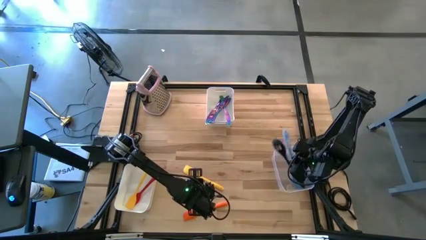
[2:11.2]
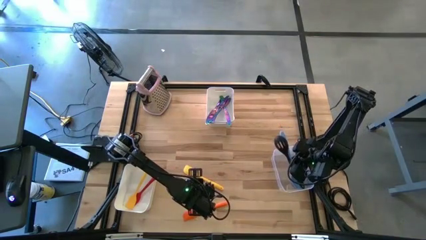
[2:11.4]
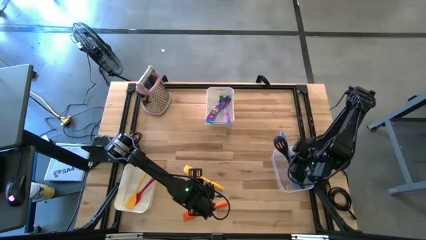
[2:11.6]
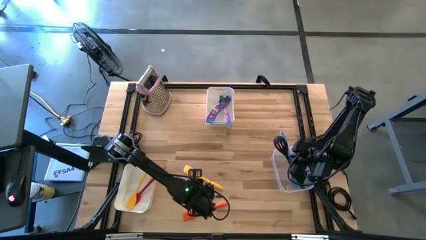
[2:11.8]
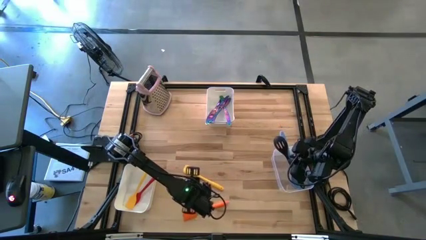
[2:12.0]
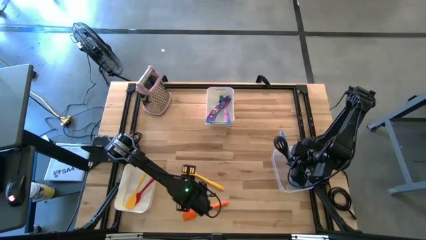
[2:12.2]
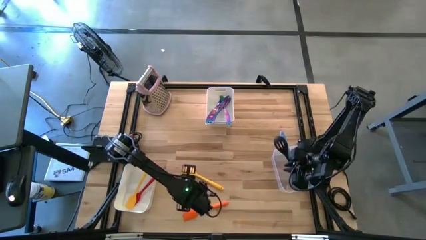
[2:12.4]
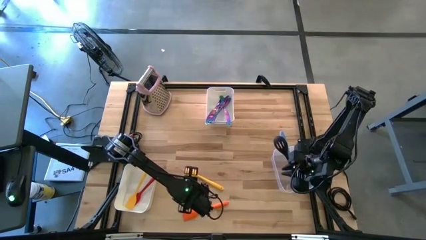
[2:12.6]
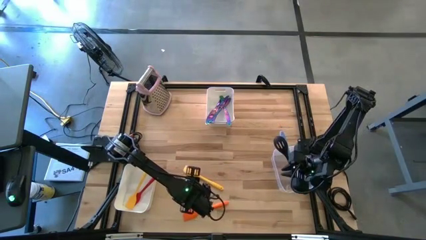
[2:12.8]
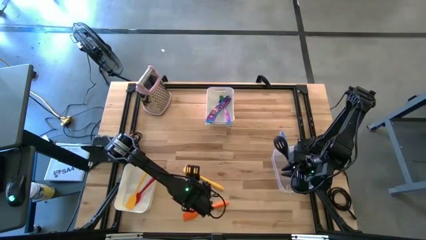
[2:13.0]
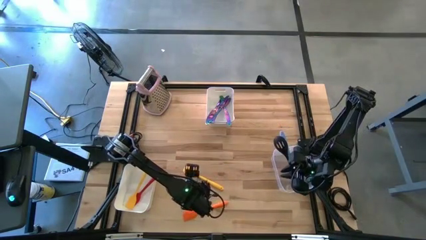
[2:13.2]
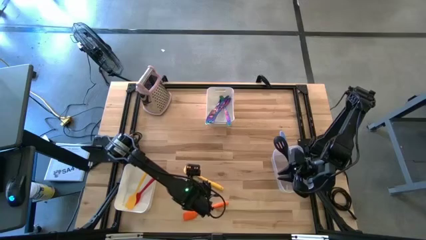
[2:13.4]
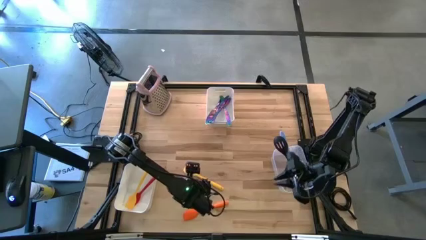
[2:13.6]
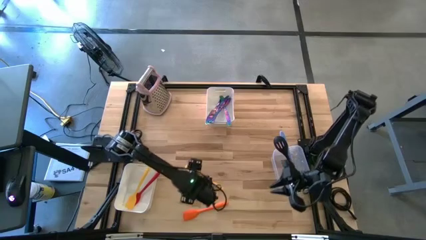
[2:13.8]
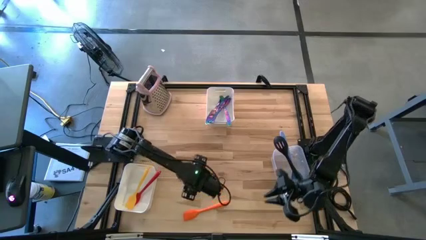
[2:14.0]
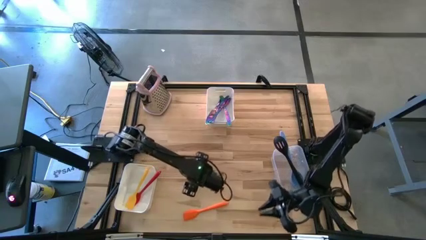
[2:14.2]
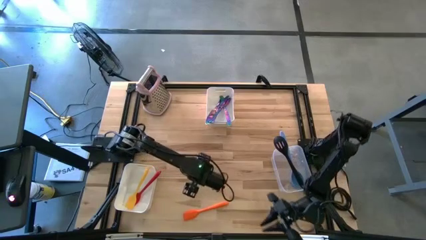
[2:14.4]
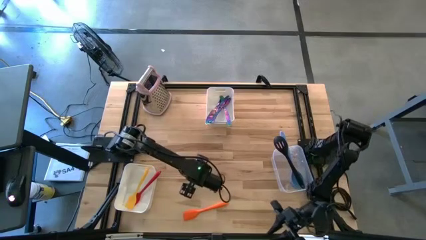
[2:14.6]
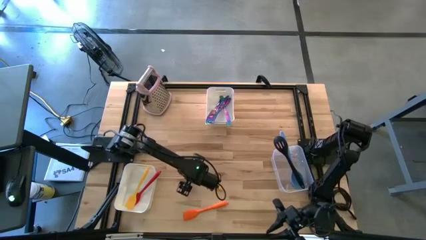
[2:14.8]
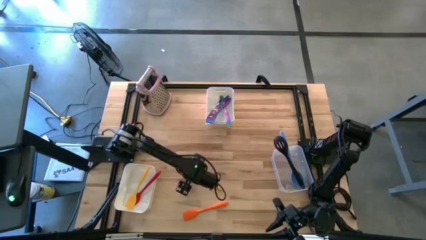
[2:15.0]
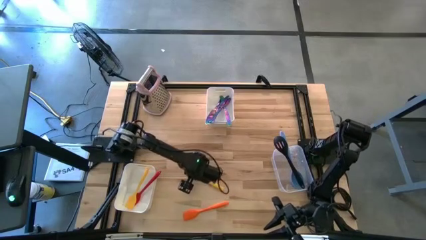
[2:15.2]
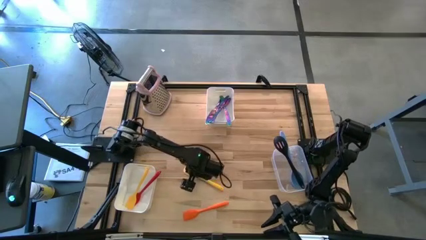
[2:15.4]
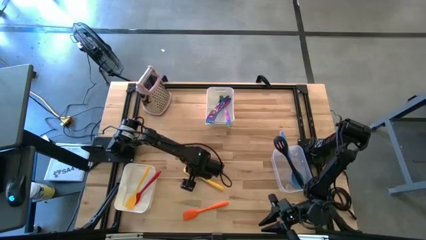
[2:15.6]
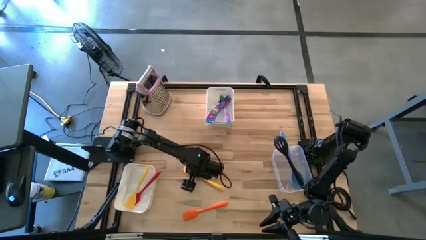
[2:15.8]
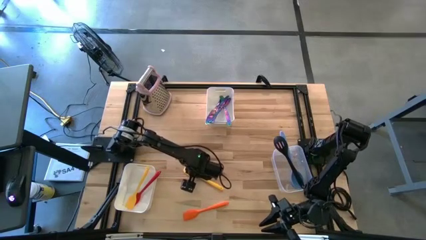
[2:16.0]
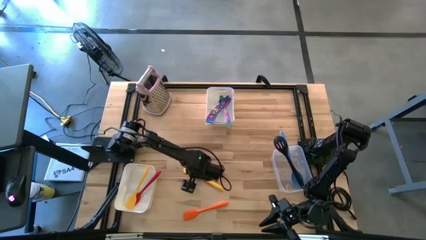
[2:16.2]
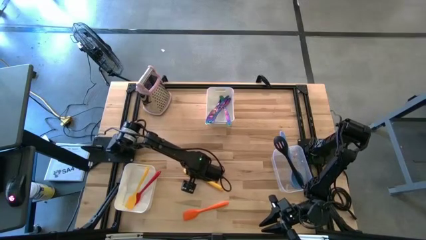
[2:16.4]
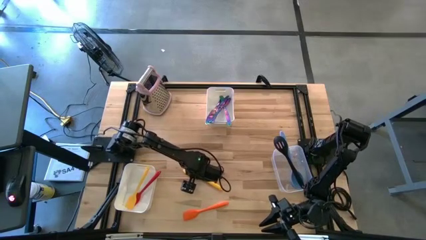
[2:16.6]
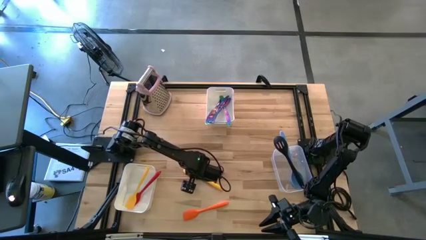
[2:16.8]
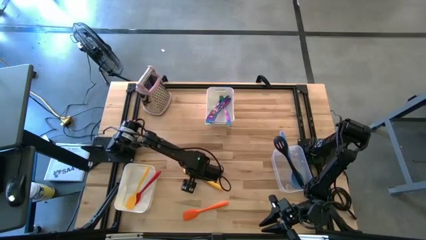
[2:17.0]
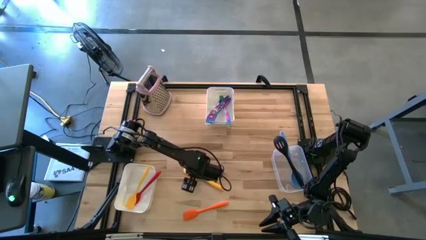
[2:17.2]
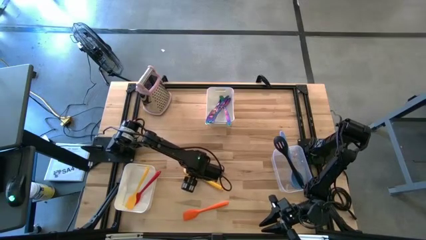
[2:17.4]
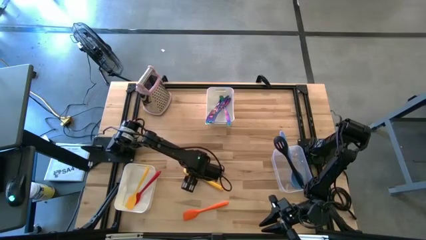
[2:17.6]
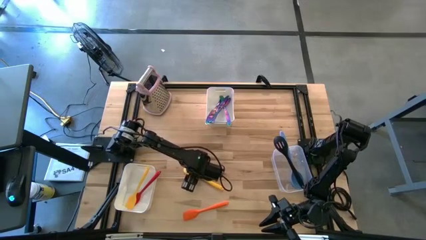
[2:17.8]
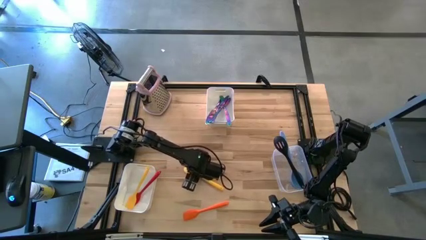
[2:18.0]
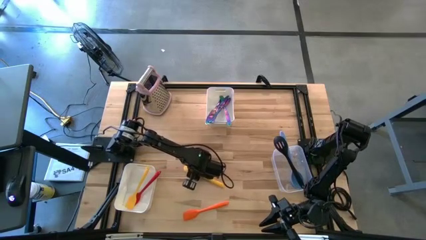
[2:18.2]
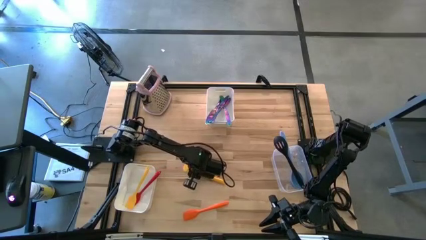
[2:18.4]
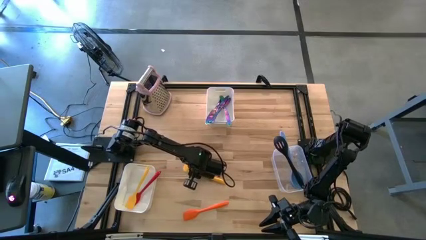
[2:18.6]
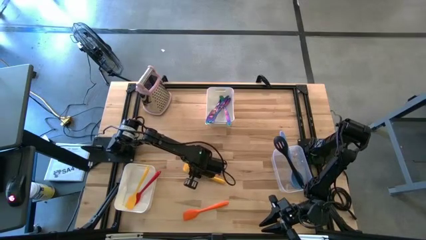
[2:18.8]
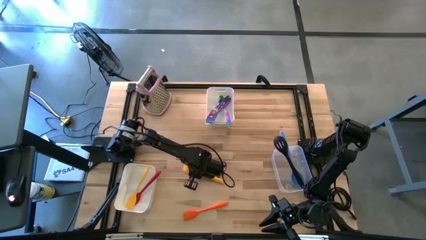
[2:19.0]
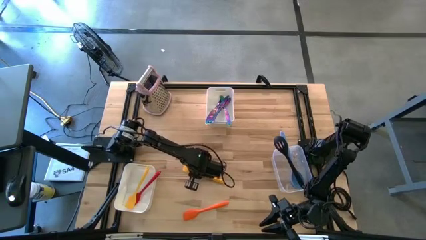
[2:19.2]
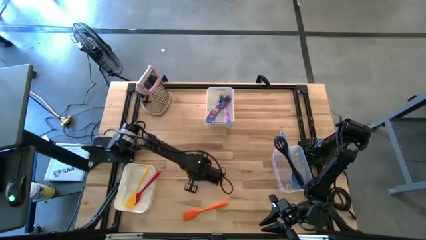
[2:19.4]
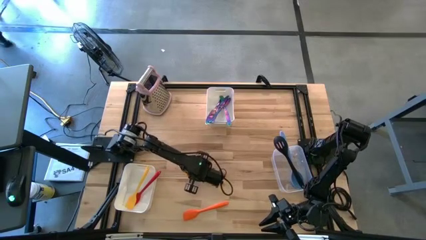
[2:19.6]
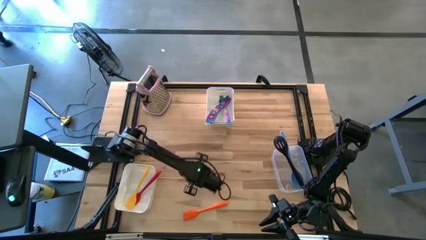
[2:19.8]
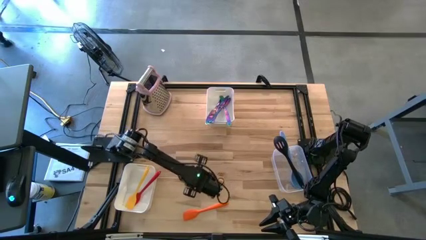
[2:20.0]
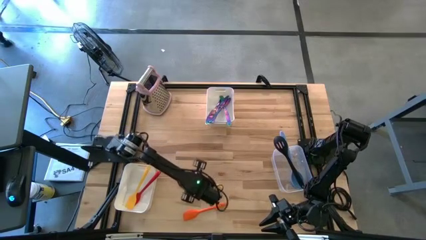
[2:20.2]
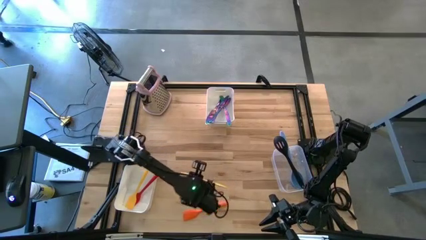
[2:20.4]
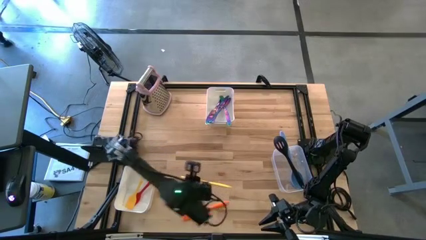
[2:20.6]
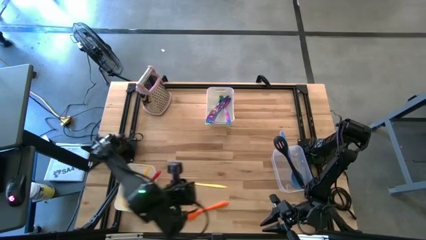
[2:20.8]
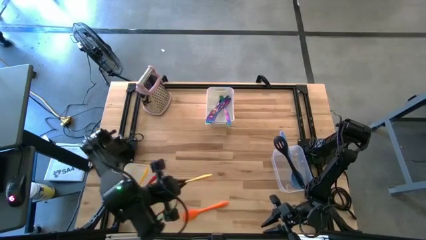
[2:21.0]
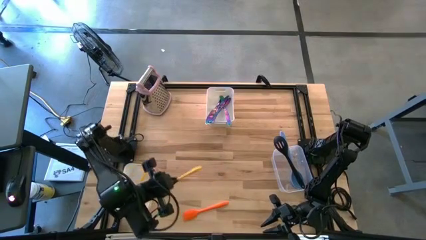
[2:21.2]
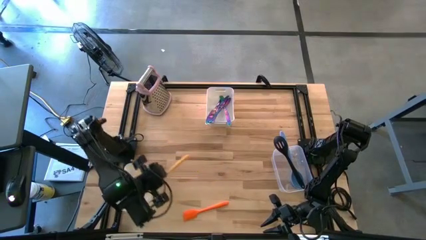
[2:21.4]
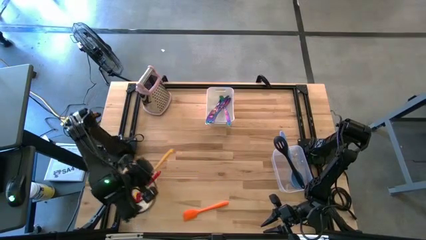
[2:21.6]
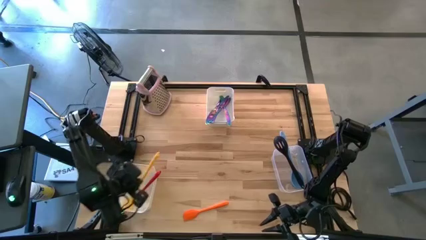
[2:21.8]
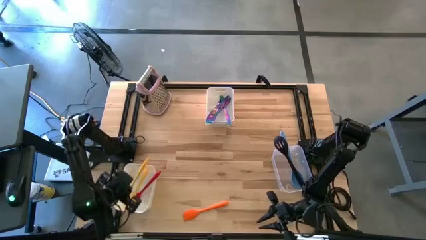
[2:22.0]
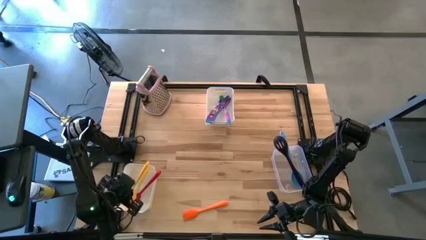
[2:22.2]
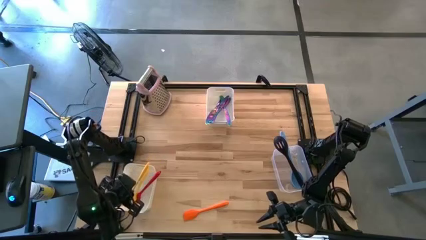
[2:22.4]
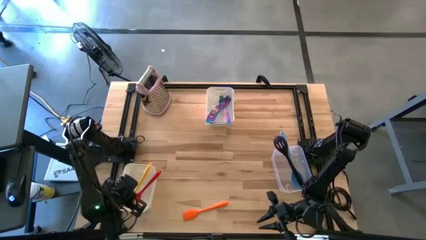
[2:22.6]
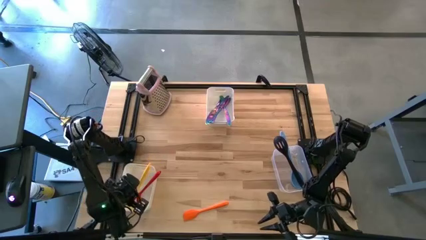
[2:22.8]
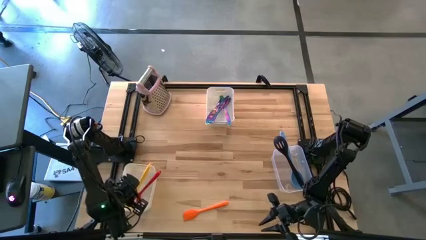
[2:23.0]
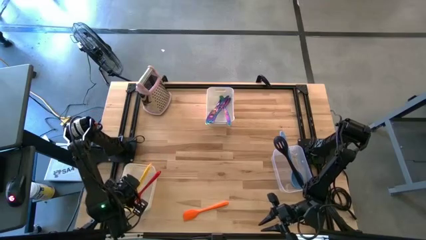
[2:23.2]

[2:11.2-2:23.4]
Task: Pick & Place Kitchen Items
Put the yellow spatula into the left white bin
